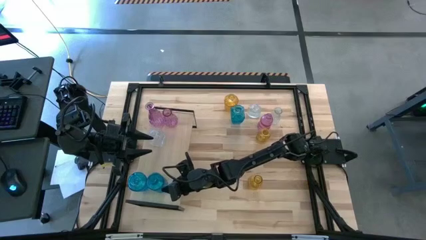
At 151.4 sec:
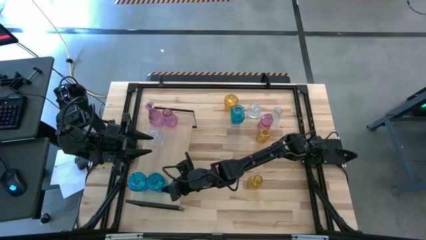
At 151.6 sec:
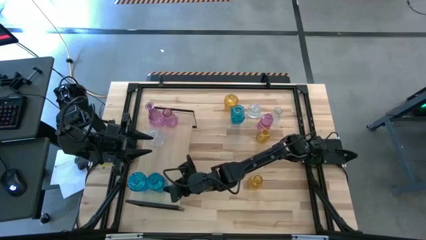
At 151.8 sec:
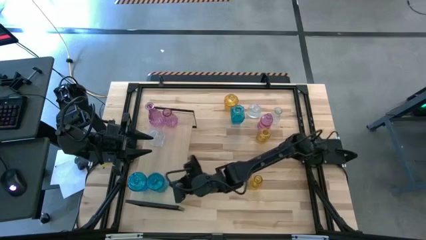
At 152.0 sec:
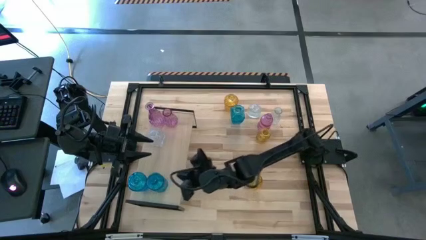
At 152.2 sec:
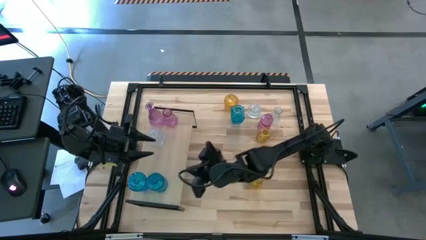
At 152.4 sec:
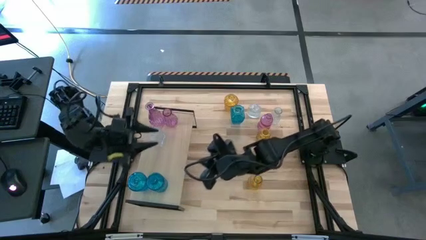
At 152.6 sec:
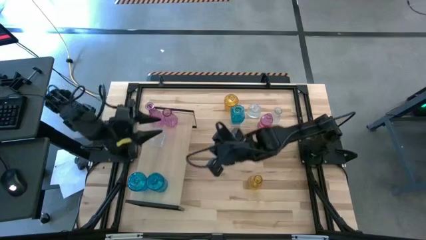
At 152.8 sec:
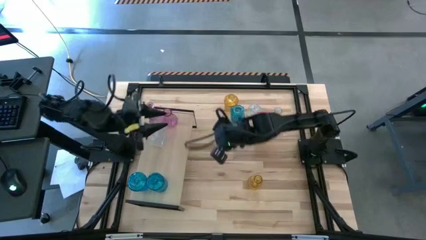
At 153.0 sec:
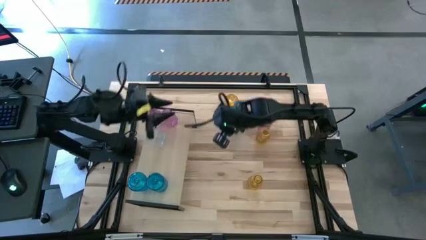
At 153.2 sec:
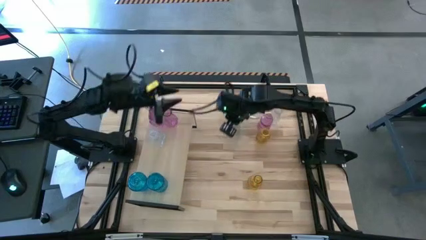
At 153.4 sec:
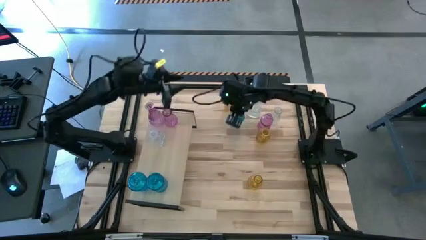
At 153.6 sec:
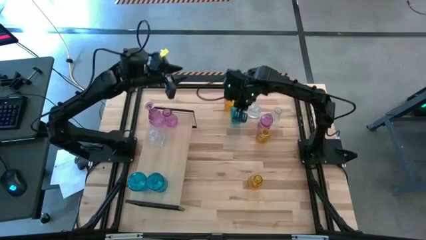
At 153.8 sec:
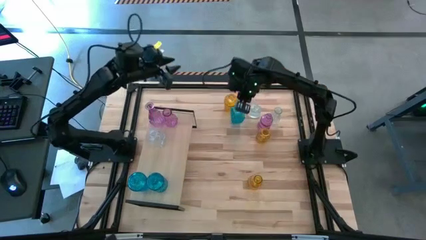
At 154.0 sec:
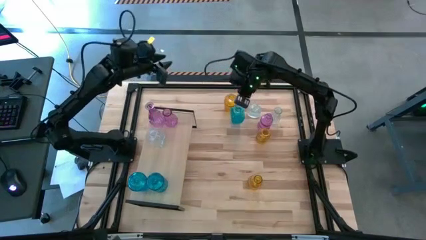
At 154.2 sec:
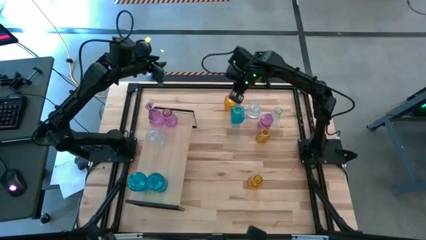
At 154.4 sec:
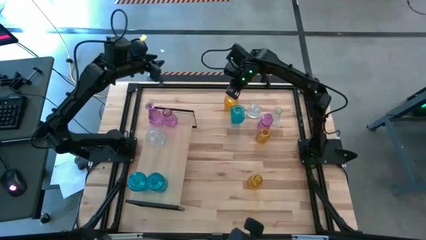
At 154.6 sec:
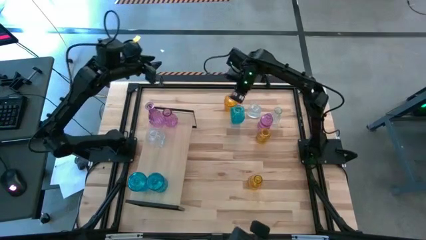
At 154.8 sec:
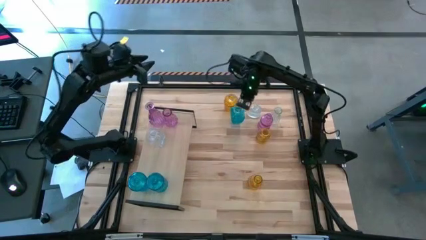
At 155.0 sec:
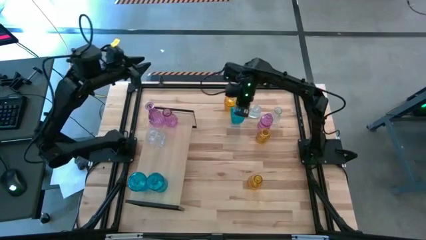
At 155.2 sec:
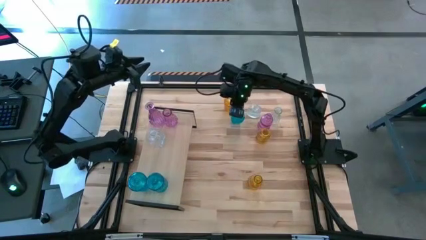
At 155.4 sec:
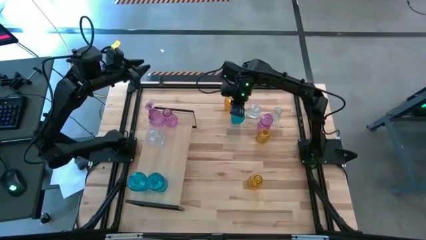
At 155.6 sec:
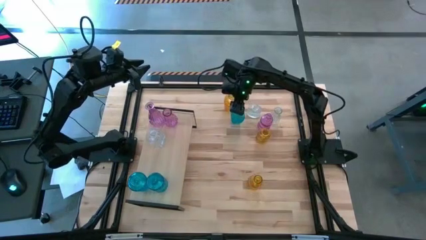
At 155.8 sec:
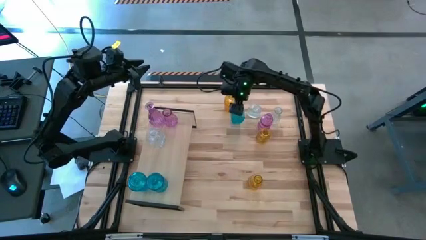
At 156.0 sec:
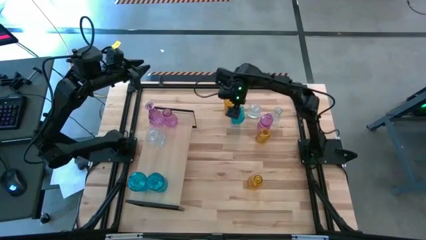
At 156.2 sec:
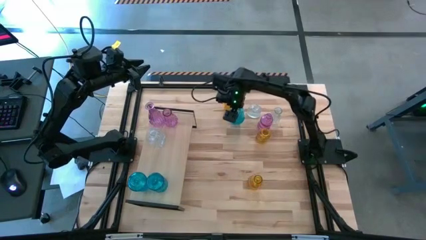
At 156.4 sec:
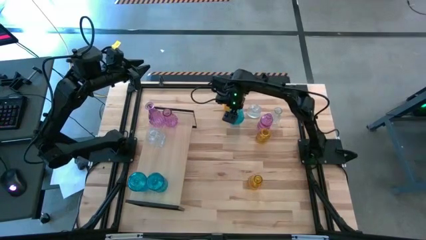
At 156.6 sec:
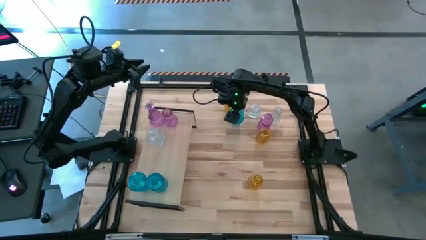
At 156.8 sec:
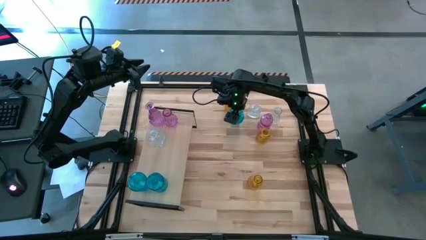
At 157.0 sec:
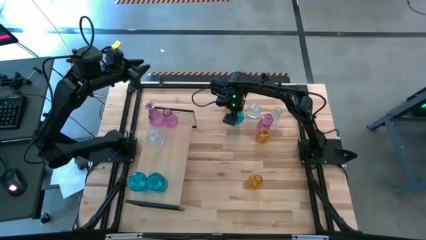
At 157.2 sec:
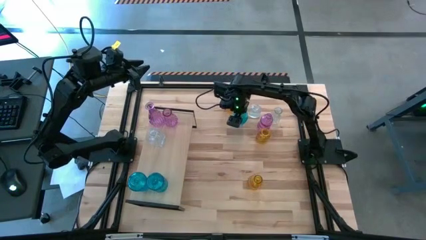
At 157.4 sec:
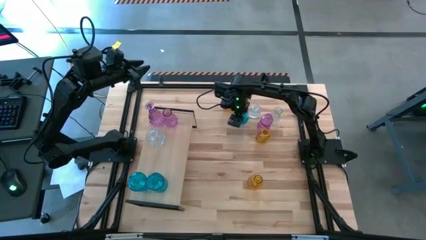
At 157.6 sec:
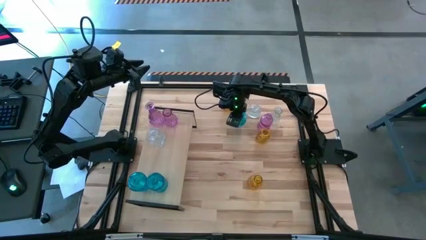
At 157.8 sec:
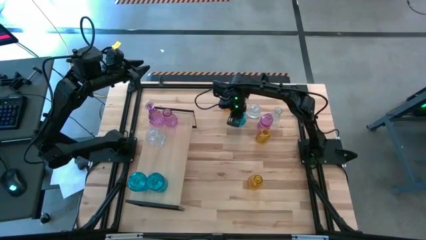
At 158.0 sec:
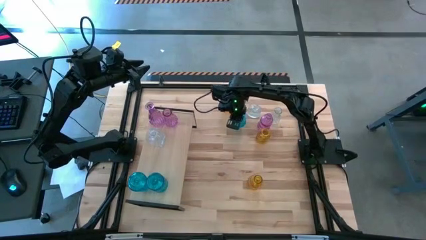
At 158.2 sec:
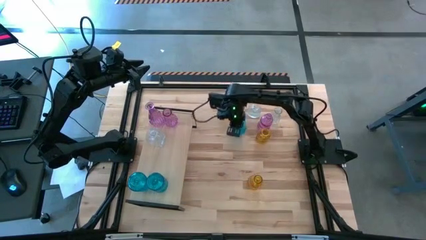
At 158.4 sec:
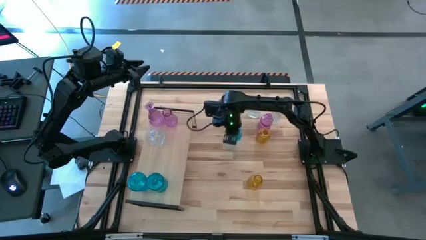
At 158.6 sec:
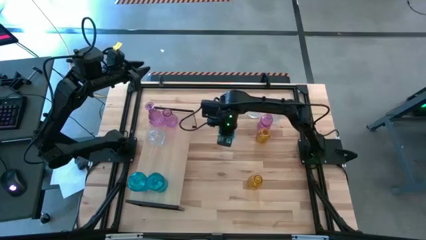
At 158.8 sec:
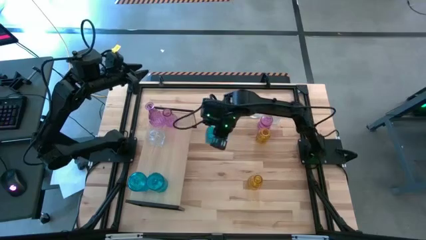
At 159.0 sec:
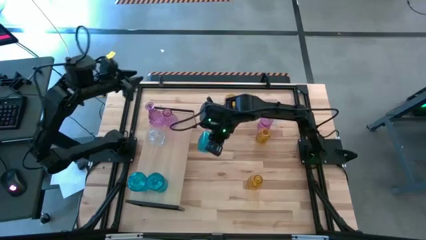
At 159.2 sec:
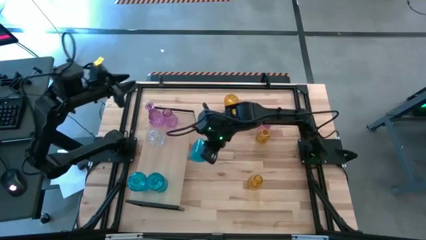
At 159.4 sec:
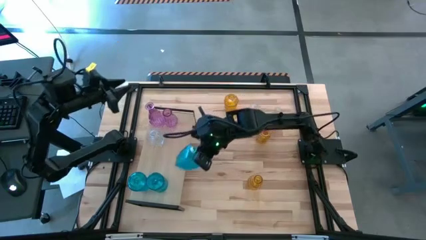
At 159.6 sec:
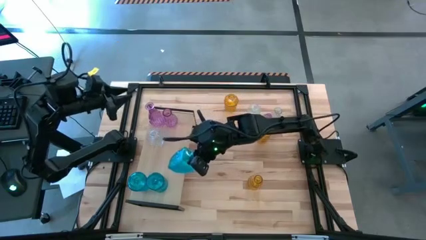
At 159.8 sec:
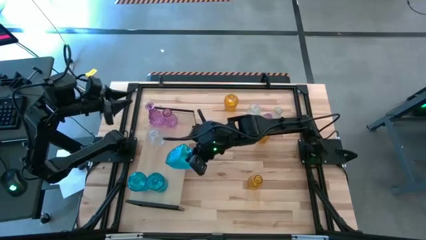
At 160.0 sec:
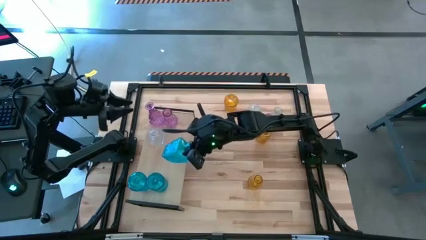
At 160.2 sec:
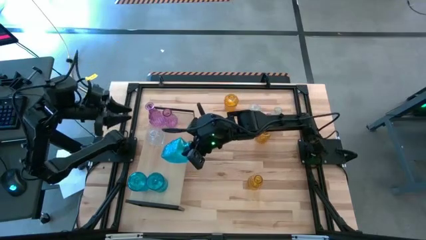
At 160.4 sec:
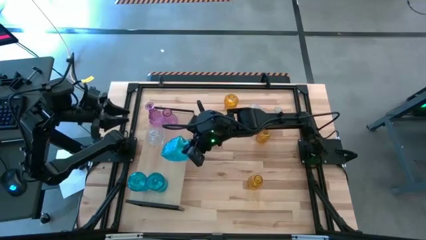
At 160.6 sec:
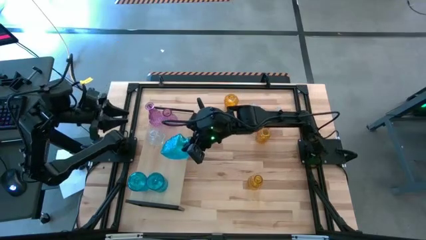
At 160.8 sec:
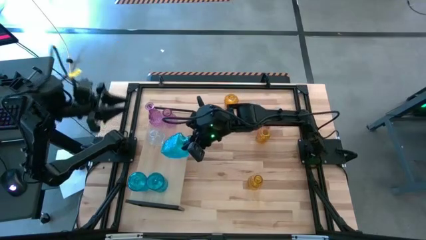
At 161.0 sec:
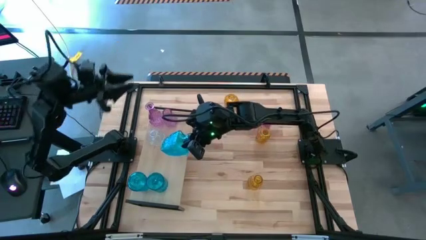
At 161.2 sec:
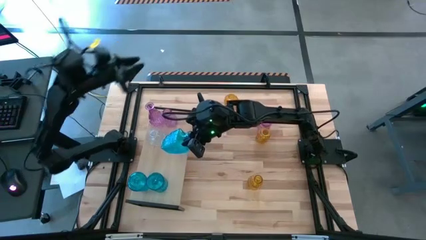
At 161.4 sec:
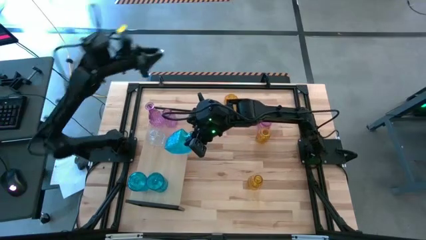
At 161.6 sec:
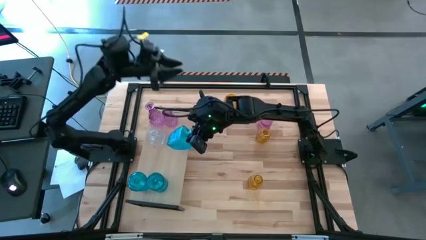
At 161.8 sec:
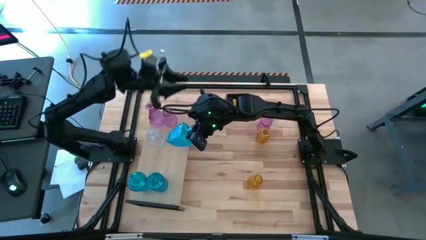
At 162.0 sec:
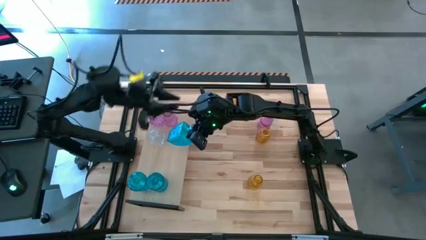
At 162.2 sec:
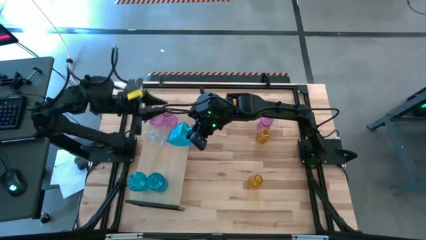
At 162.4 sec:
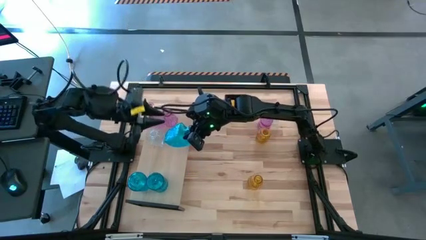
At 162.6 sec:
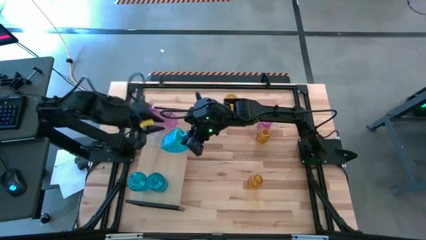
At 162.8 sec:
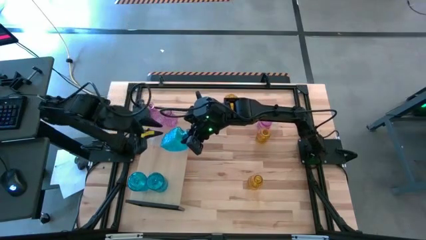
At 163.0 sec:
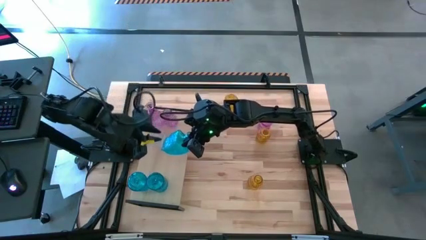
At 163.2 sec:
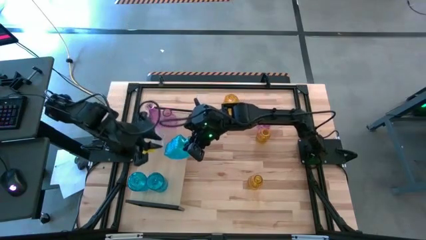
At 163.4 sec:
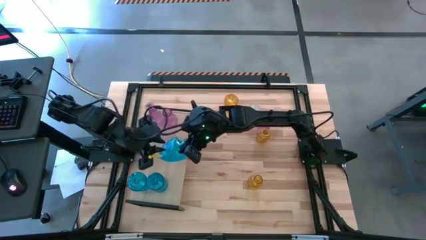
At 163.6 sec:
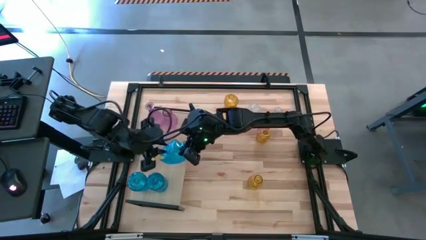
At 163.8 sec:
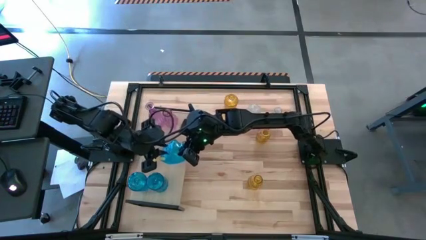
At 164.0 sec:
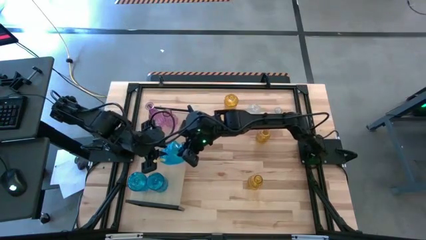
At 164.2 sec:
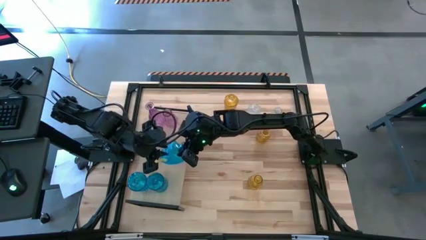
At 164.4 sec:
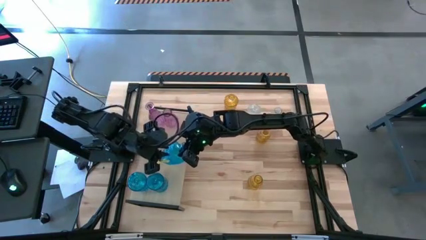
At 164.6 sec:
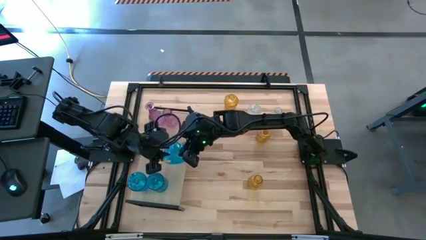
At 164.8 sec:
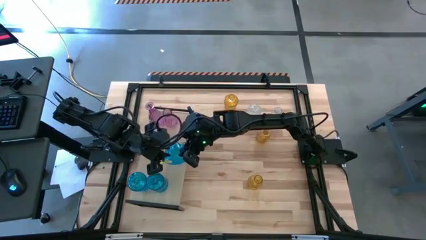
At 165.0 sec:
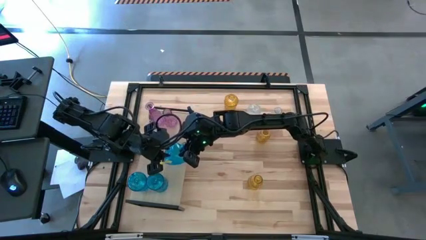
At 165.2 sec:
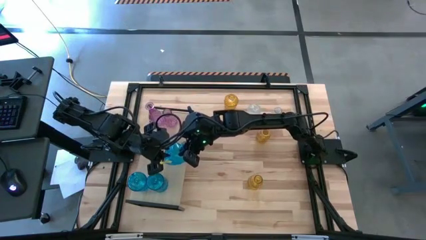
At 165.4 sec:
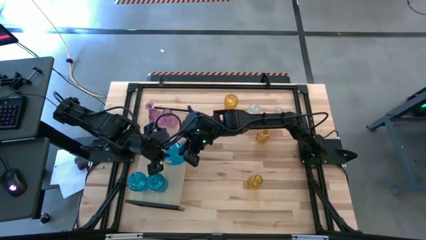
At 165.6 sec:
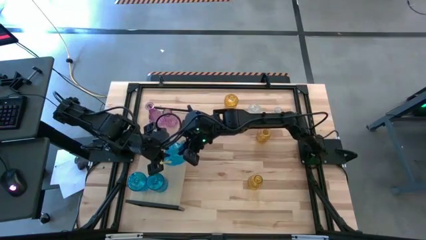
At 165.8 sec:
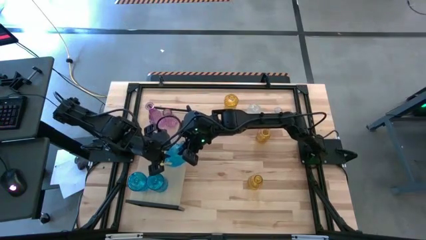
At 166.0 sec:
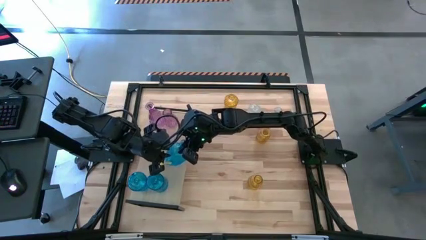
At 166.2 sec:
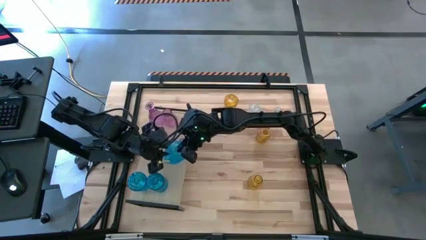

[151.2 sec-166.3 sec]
Task: sort vases onto shelf
Put the blue flower vase on the shelf
